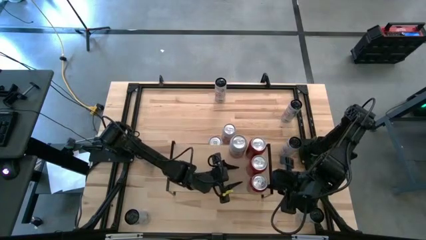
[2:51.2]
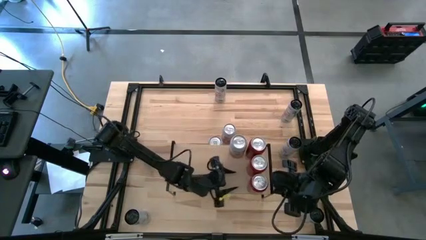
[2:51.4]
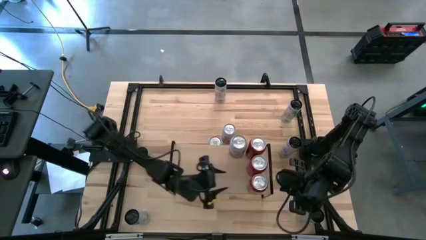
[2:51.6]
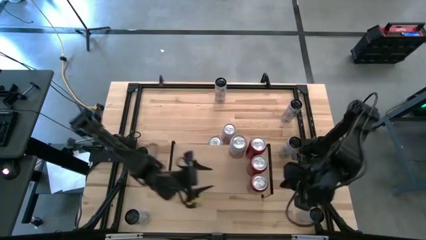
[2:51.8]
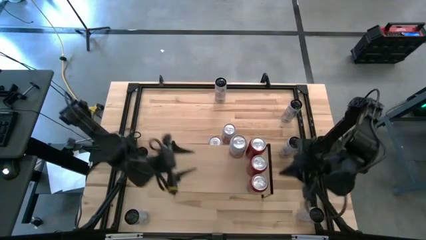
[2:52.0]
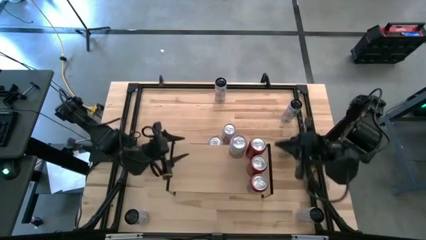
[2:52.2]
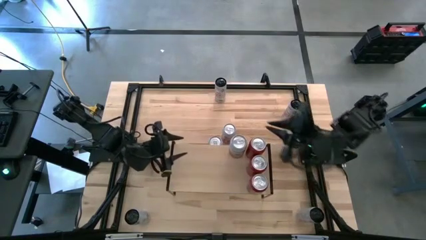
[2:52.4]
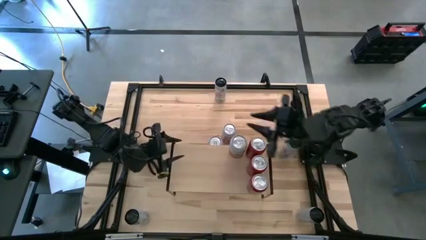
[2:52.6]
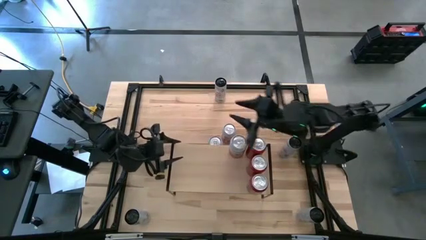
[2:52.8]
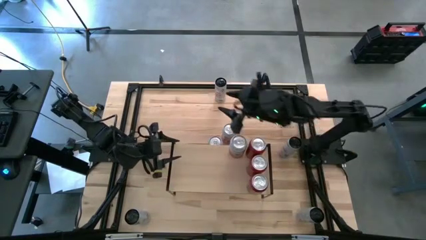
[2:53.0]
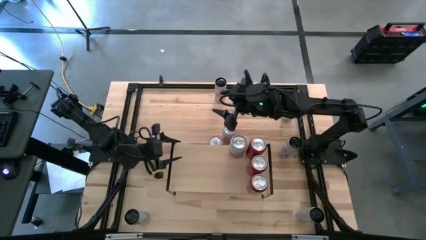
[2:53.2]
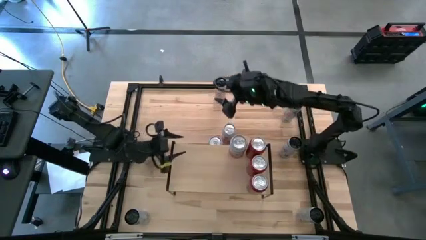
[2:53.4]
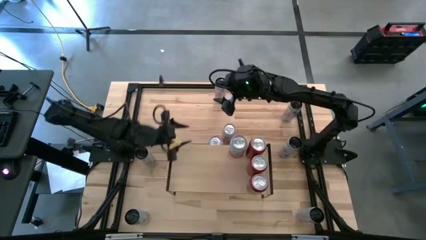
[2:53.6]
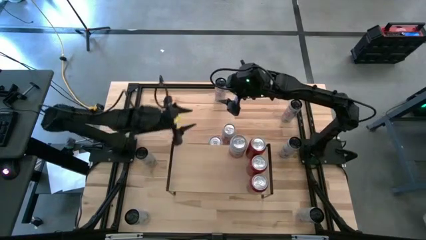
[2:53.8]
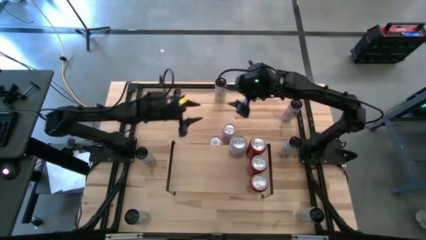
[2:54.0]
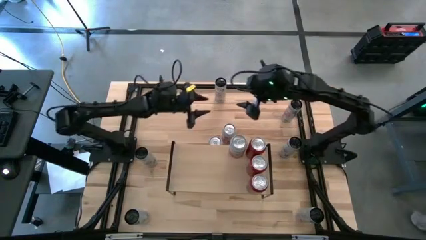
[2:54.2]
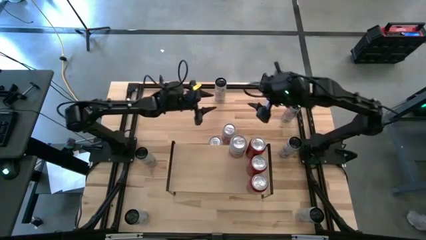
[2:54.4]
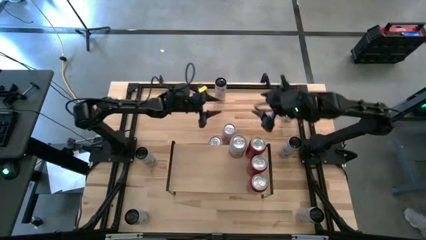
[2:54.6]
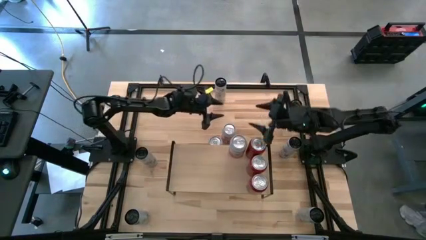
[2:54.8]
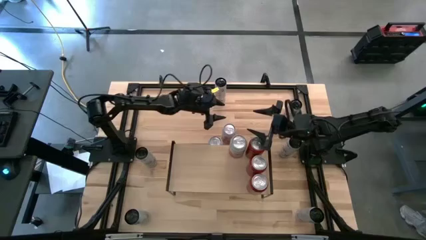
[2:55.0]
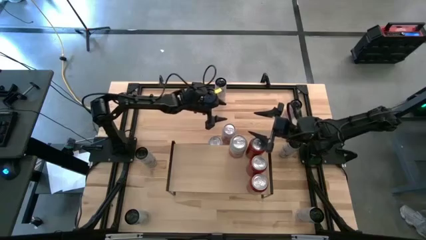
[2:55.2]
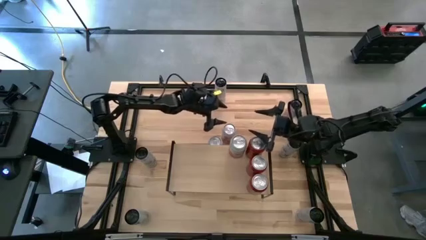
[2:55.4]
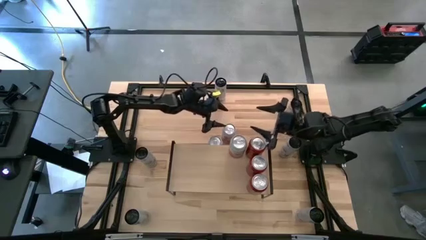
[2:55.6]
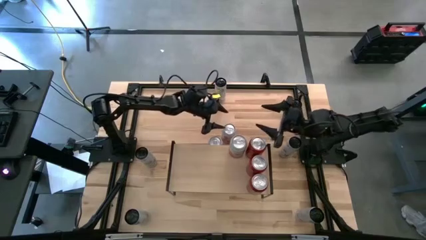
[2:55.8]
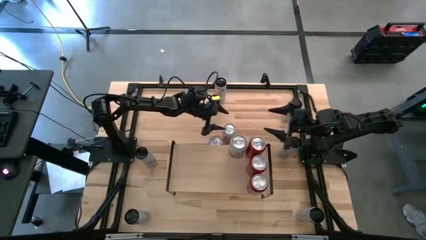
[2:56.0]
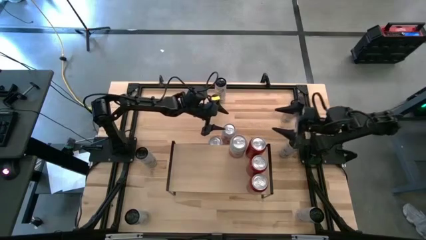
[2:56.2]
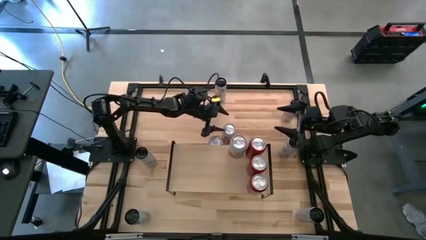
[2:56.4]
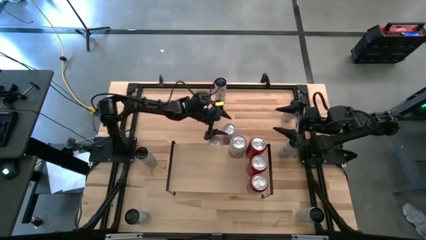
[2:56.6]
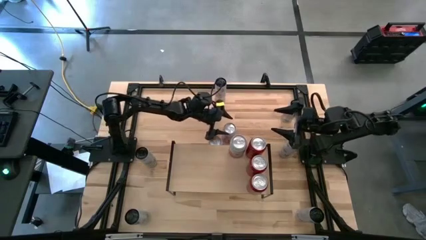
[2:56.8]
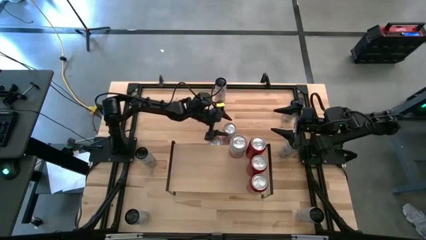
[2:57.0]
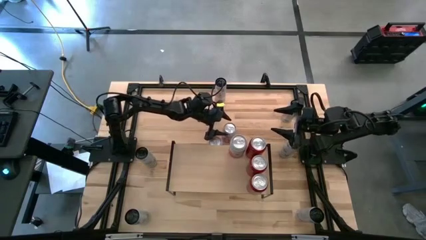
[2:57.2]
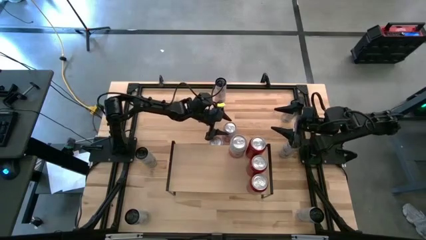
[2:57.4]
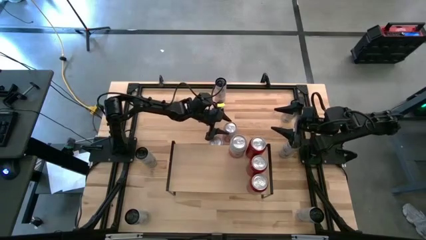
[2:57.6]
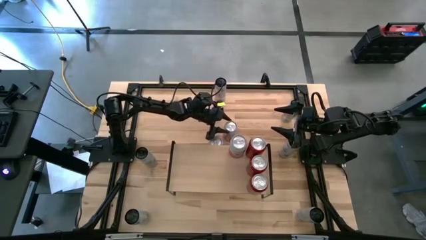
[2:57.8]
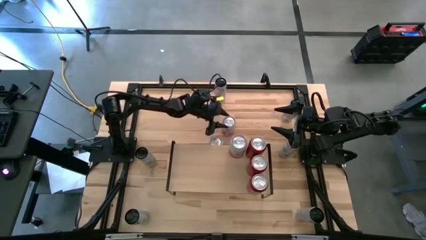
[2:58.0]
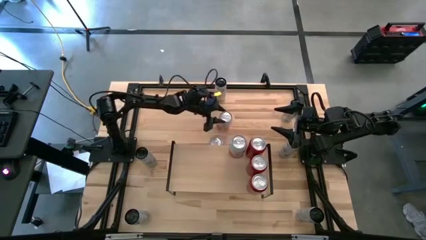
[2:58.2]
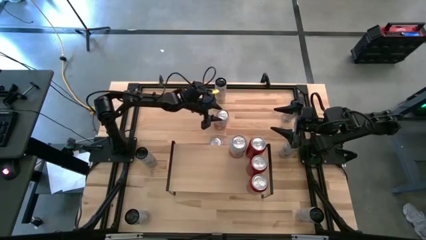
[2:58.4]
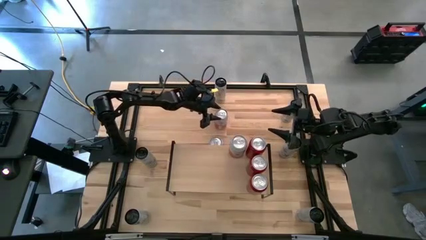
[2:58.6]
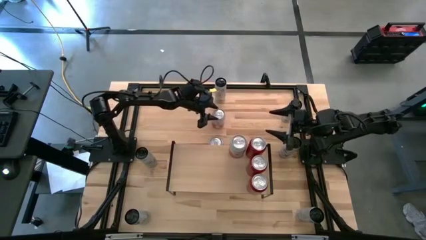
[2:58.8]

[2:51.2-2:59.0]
Task: Place canned beverage on shelf
Put the right pink-white soda can on the shelf aligned with the other pink-white soda cans

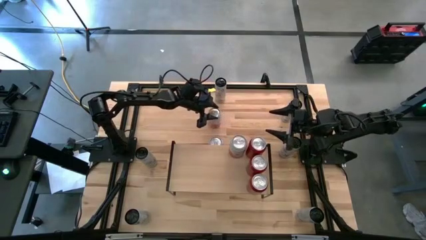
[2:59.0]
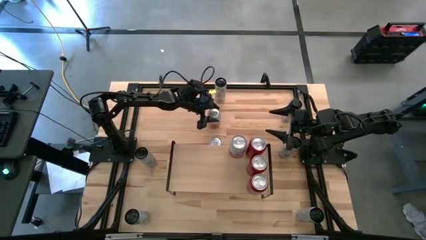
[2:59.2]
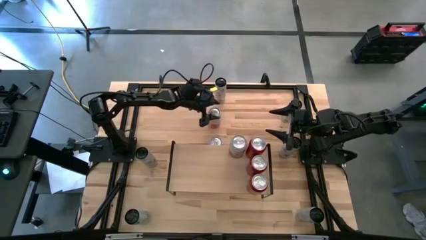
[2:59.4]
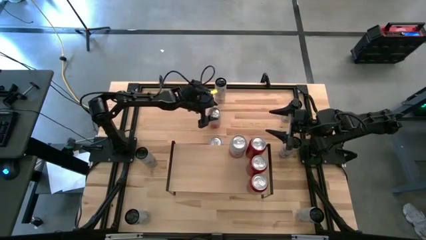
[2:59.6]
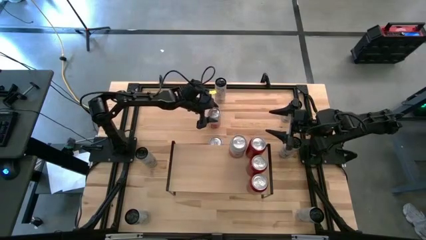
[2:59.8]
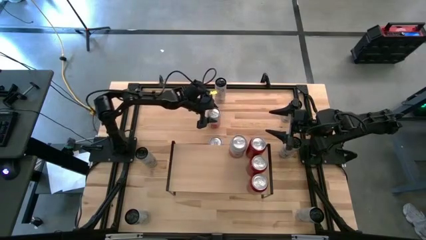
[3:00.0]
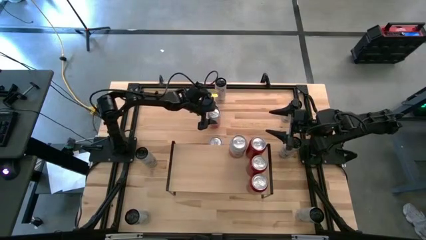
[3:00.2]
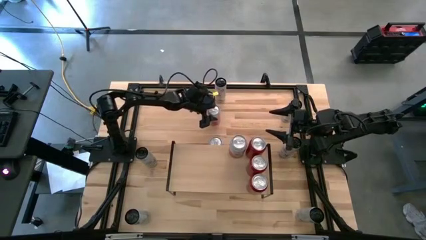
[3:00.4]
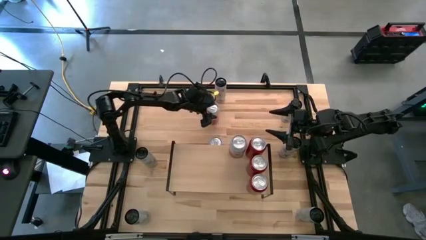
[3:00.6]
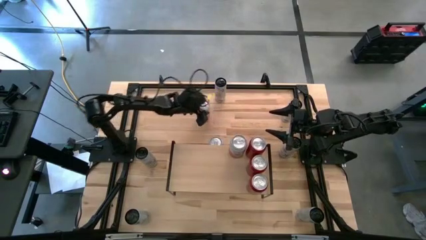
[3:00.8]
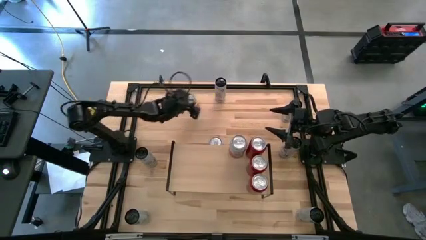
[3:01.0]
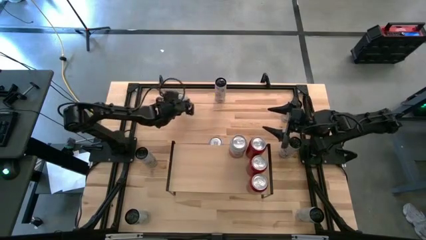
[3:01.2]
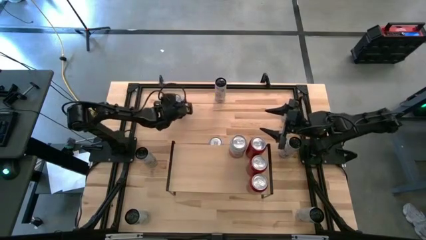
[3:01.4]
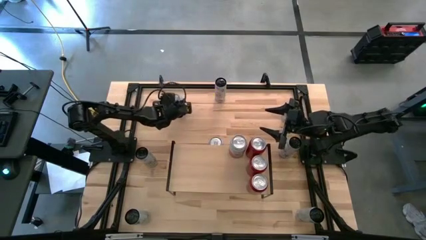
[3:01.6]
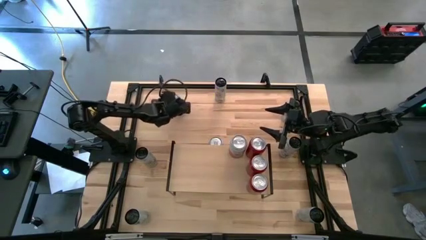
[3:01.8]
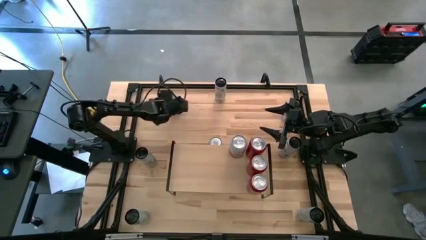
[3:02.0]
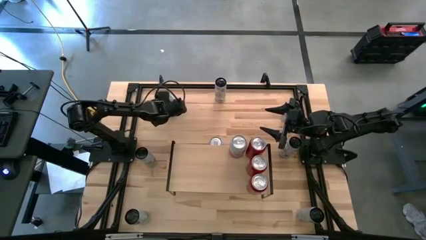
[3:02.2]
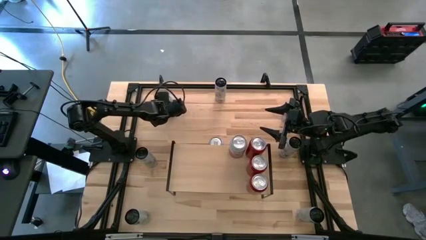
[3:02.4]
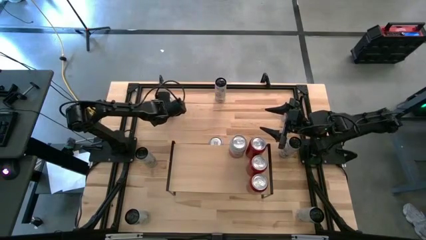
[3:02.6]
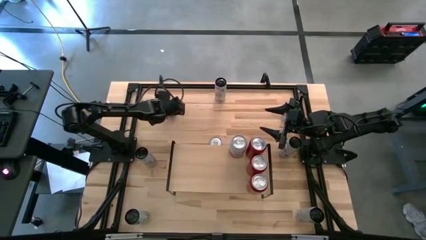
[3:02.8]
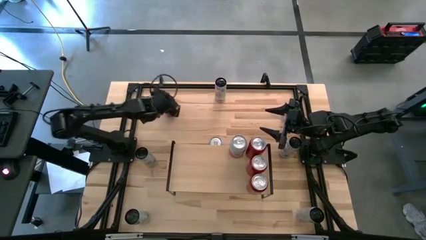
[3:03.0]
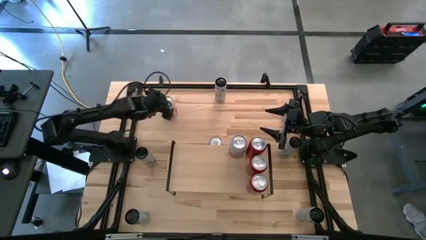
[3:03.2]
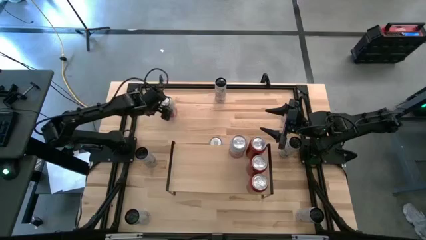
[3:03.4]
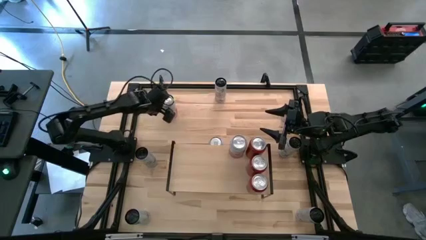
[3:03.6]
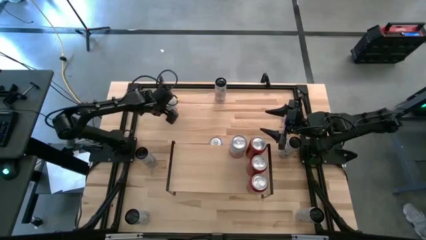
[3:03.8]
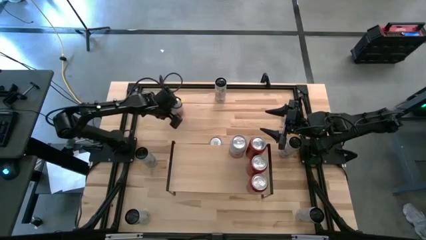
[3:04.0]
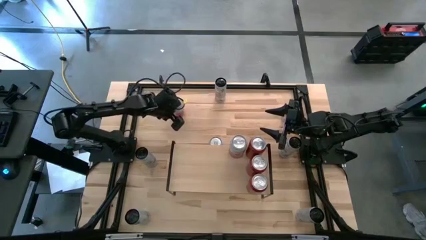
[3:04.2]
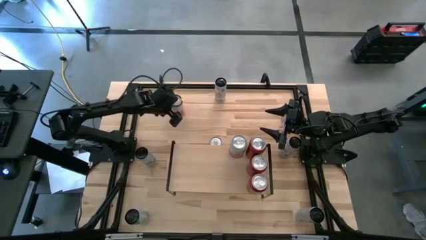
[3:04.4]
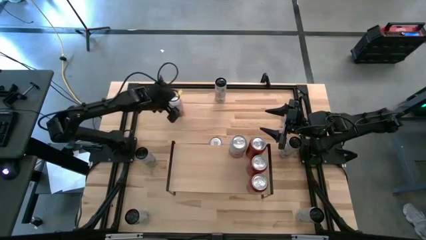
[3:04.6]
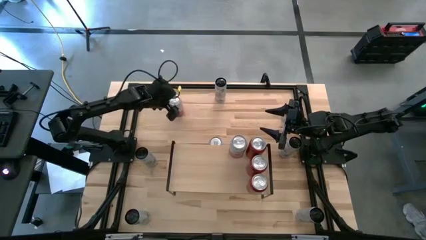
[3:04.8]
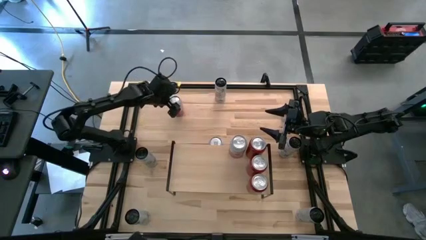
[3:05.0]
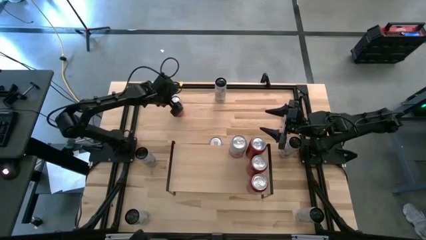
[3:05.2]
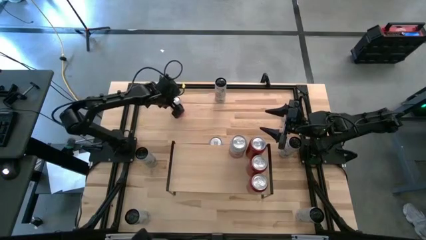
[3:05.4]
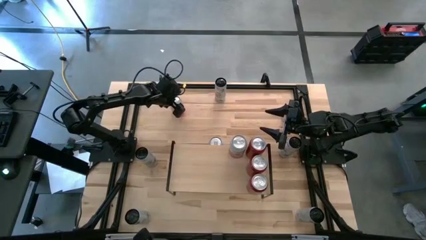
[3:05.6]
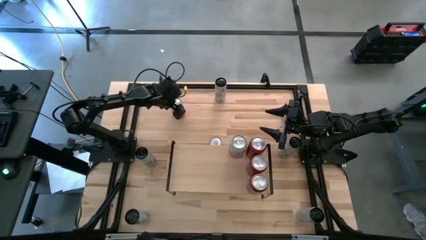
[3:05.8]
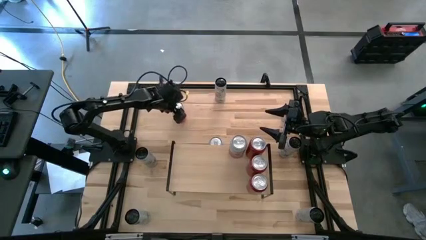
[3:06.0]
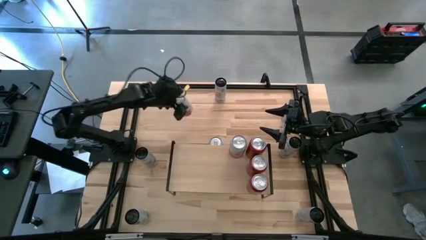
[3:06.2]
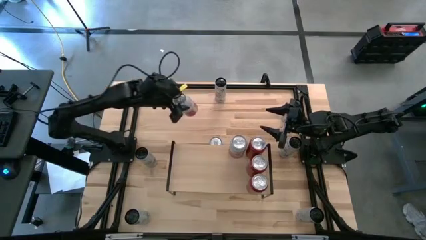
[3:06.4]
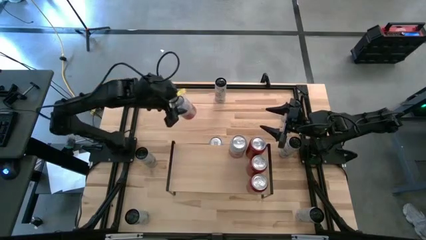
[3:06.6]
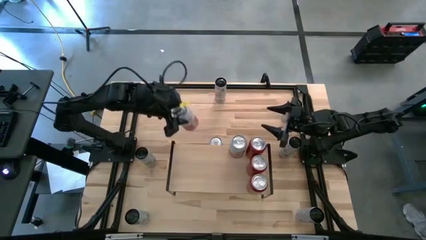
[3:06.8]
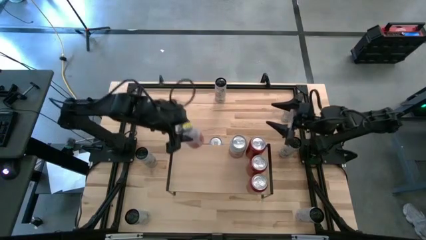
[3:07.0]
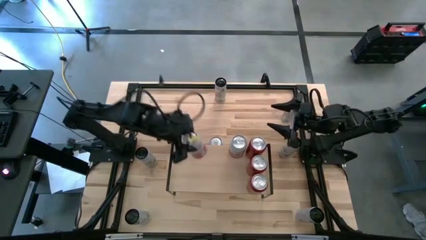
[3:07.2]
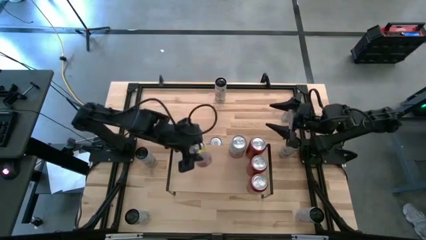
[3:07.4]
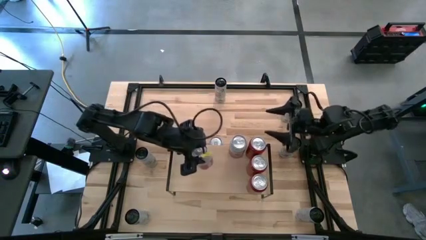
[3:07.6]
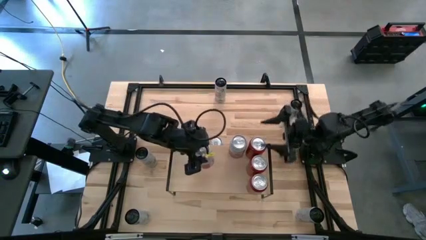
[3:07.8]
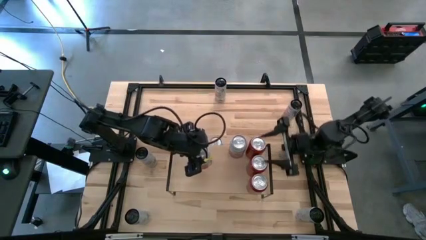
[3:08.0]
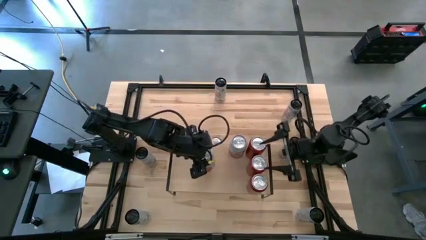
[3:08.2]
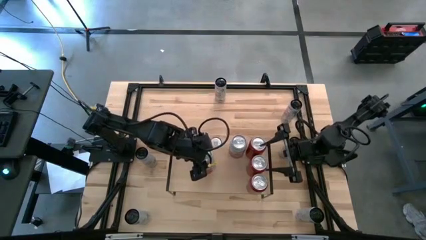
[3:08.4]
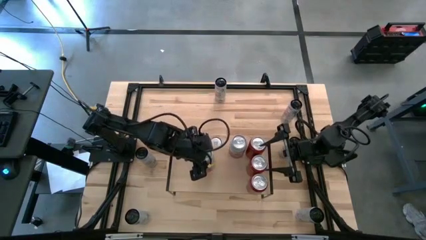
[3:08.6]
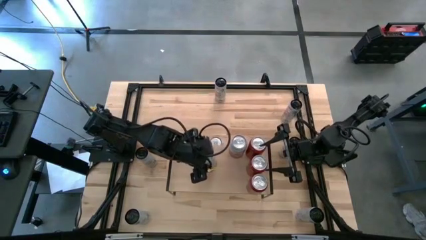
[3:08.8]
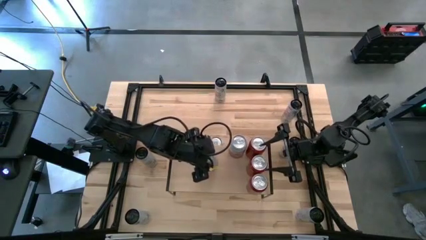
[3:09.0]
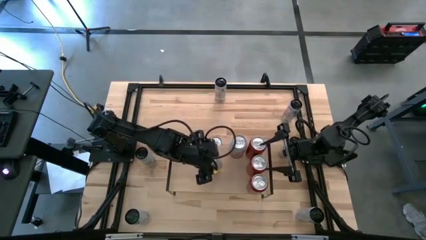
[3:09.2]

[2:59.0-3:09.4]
Put the right pink-white soda can on the shelf aligned with the other pink-white soda cans
